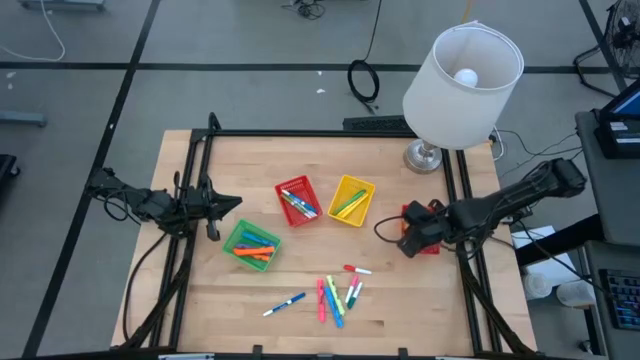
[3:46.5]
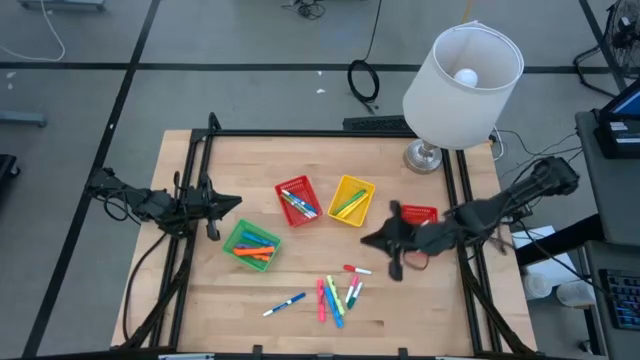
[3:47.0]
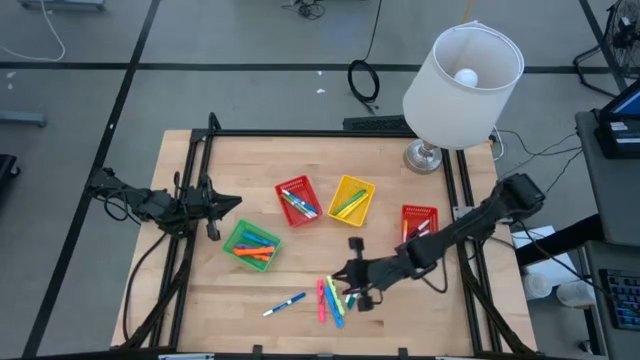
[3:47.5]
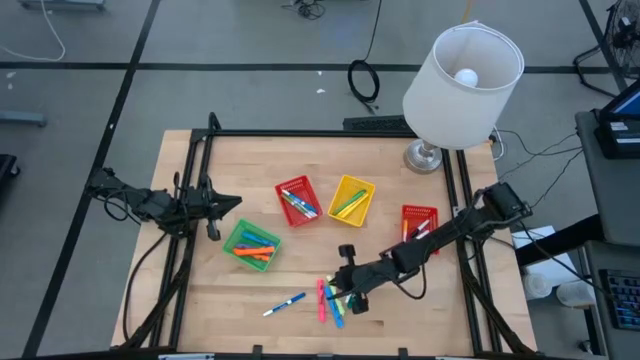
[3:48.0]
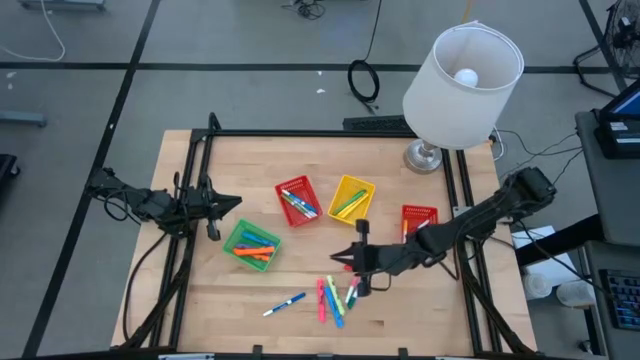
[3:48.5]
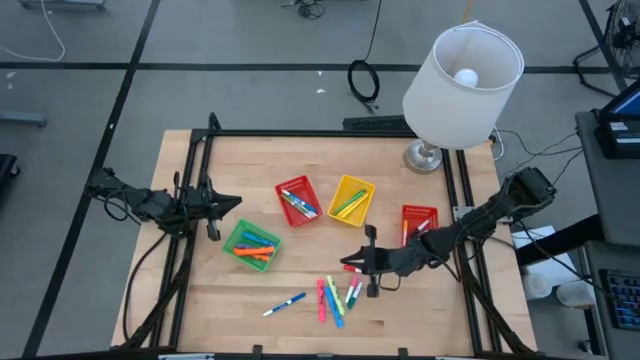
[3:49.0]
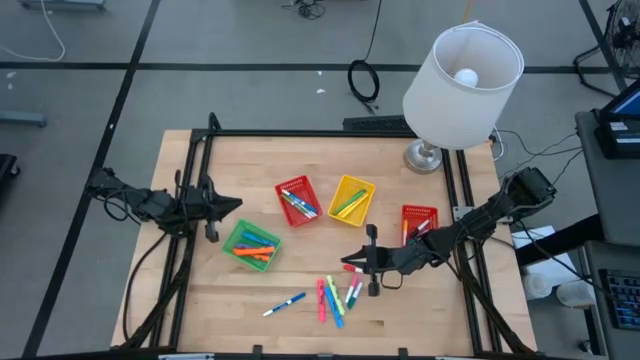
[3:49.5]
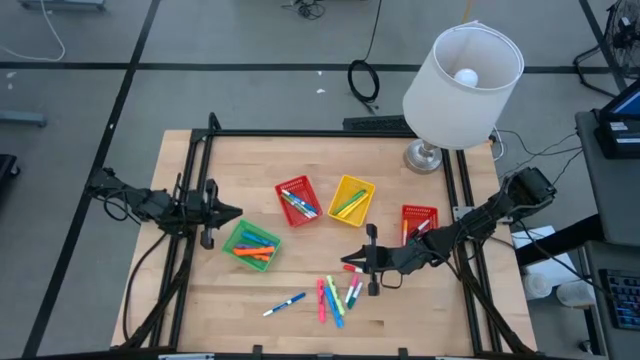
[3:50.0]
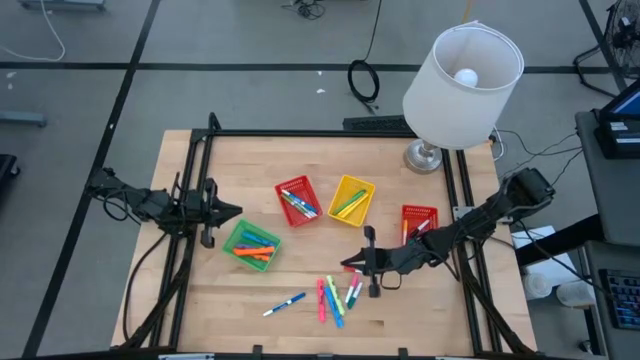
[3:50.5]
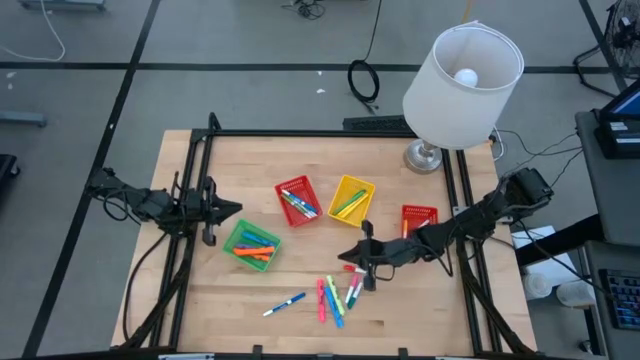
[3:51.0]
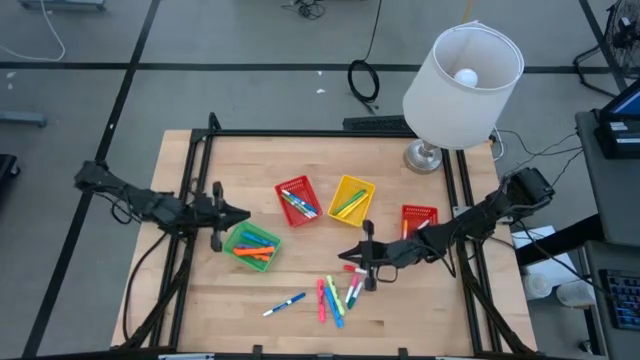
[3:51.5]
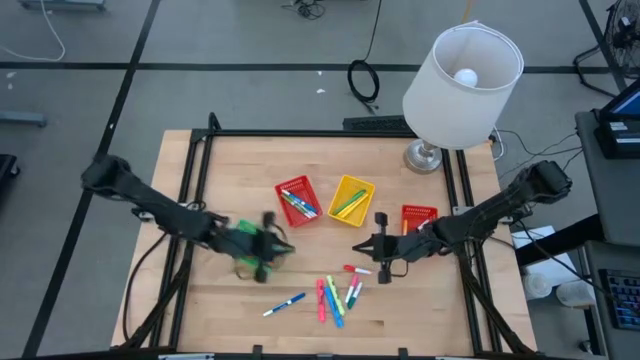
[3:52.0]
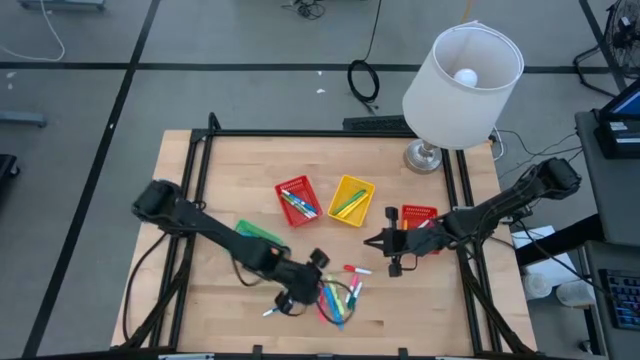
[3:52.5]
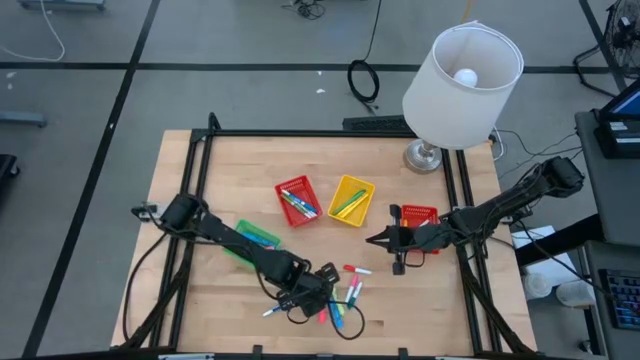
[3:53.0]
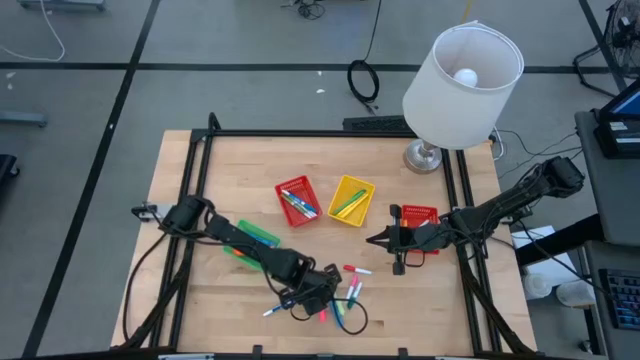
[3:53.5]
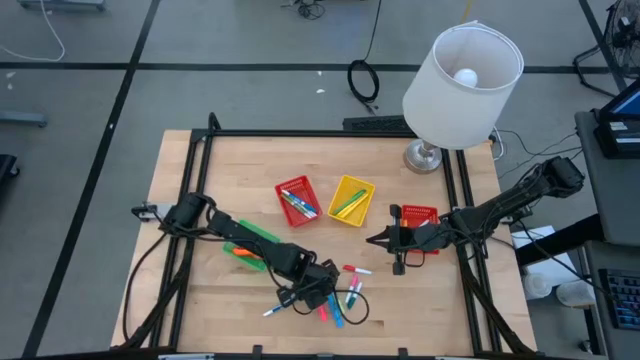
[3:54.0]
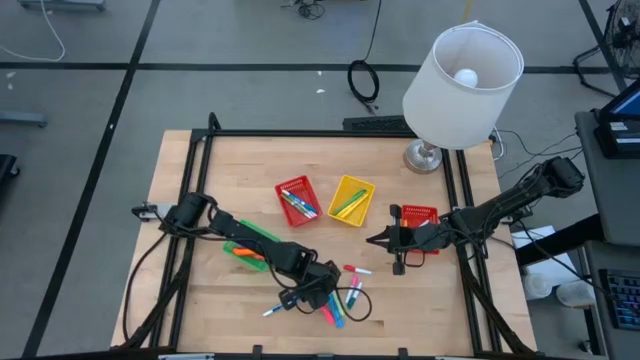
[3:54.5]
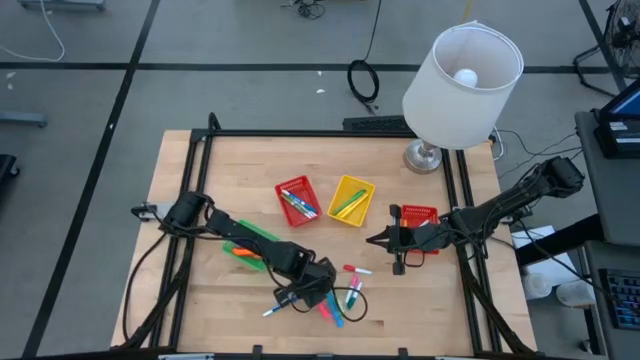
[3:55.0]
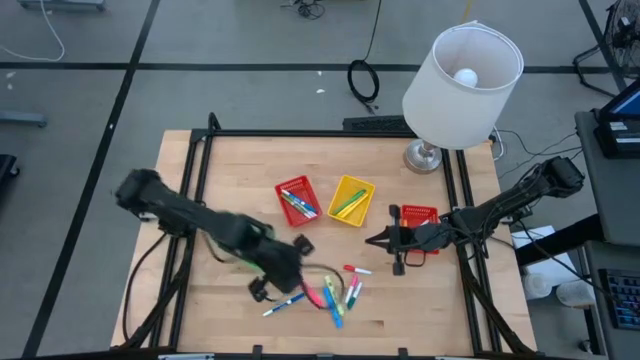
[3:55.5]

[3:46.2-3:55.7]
Task: Pick & Place Markers
Put the pink highlighter into the green bin

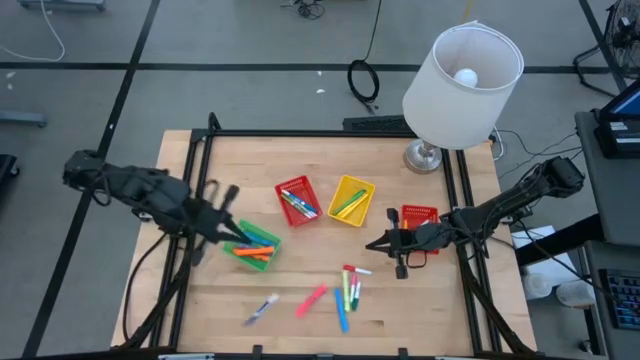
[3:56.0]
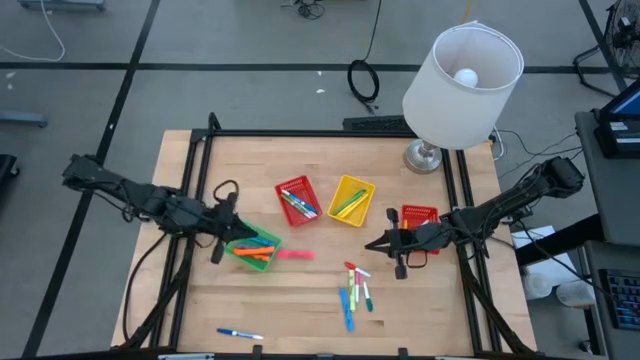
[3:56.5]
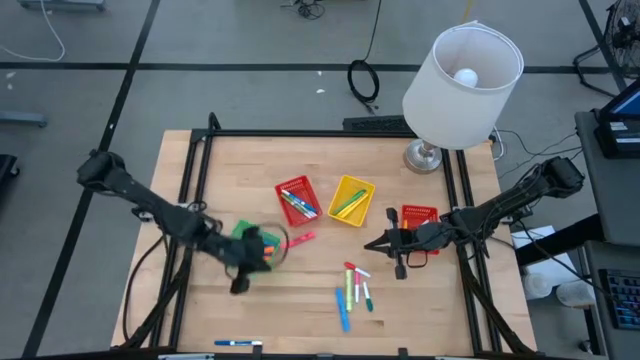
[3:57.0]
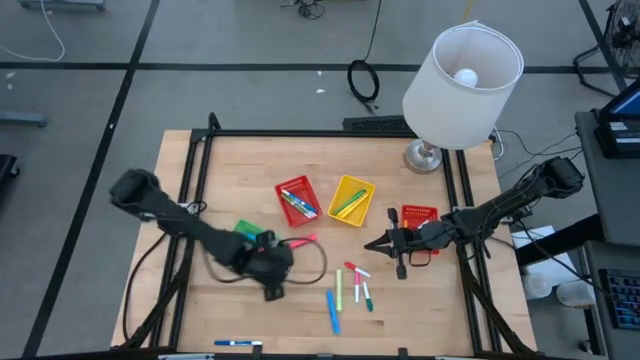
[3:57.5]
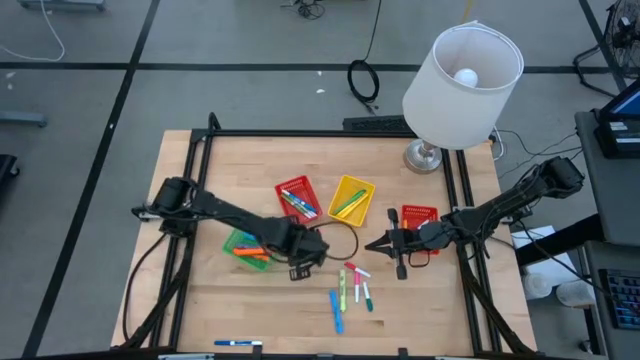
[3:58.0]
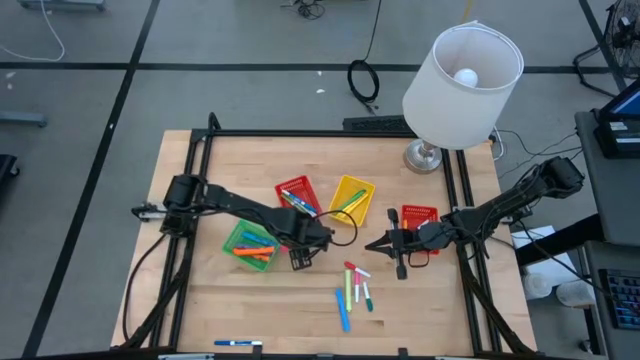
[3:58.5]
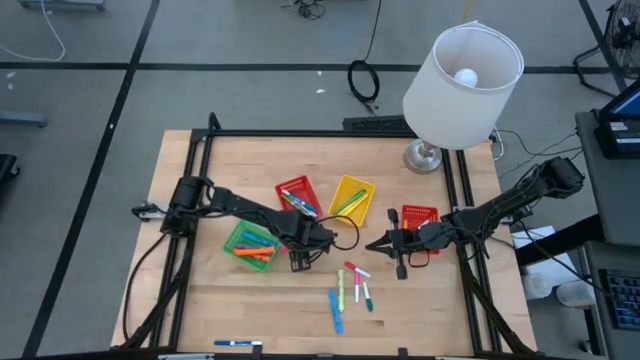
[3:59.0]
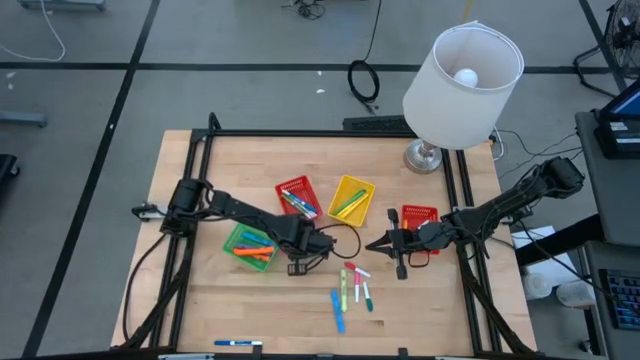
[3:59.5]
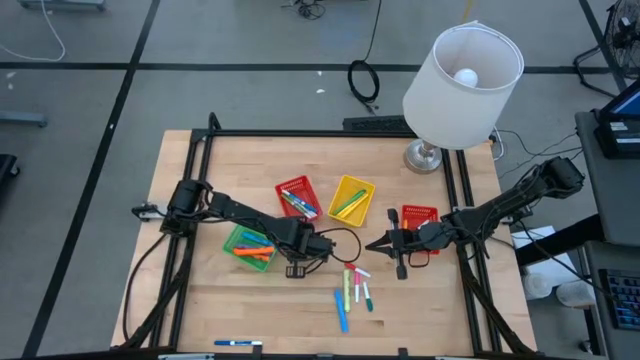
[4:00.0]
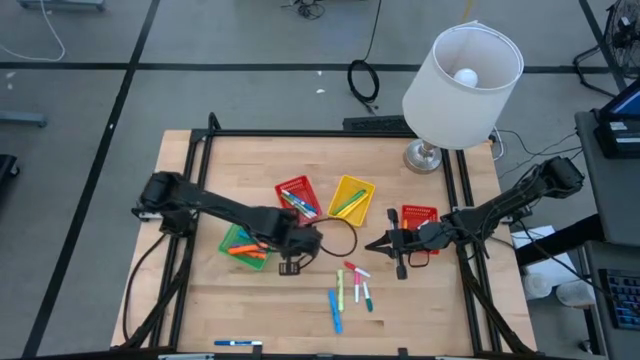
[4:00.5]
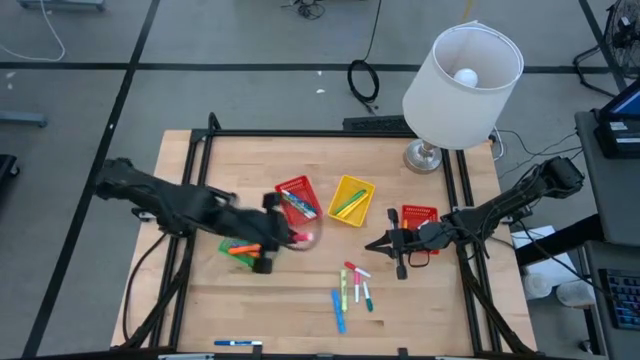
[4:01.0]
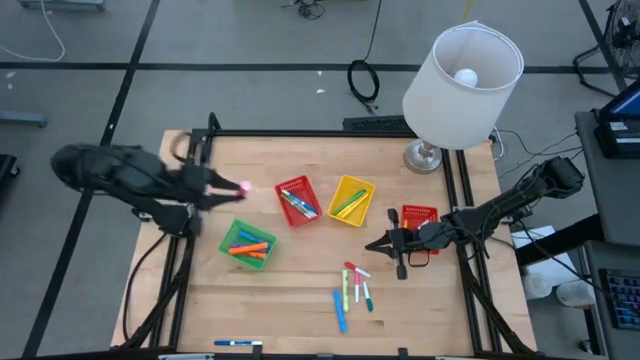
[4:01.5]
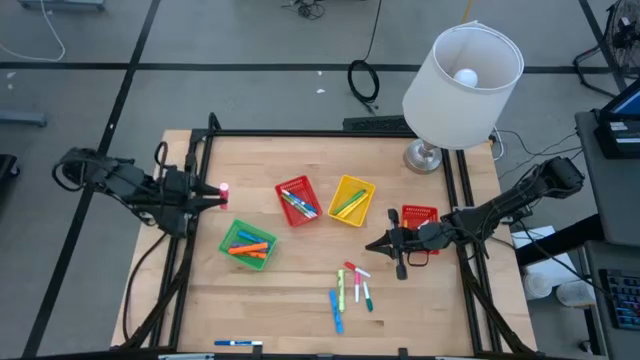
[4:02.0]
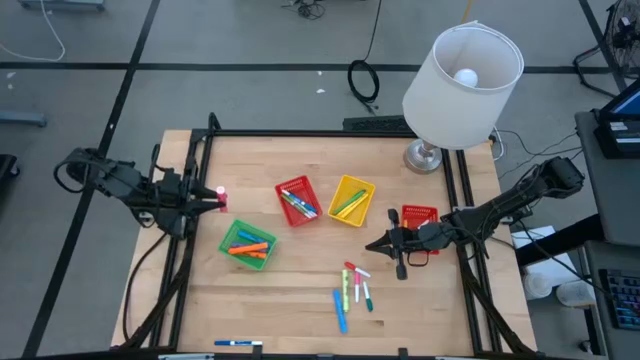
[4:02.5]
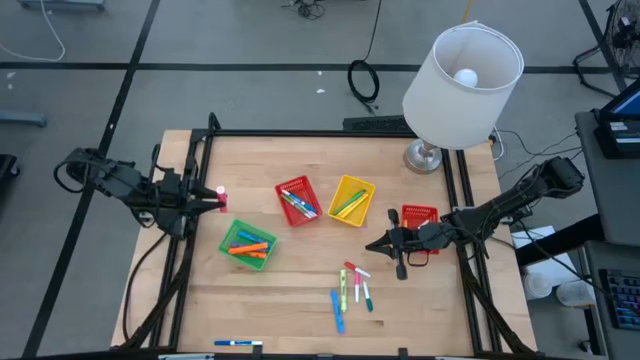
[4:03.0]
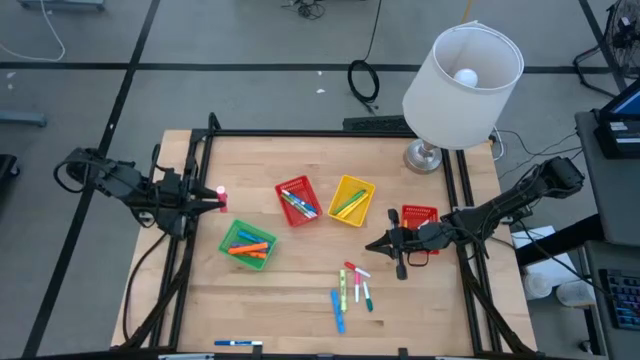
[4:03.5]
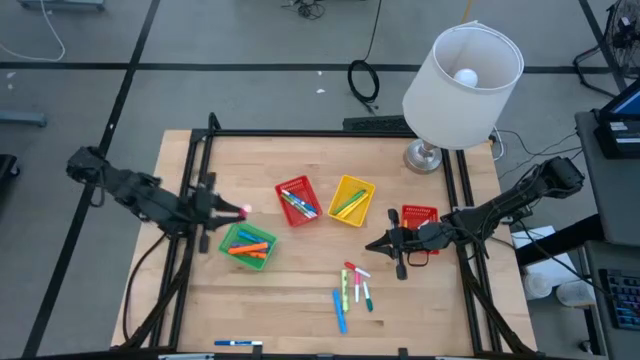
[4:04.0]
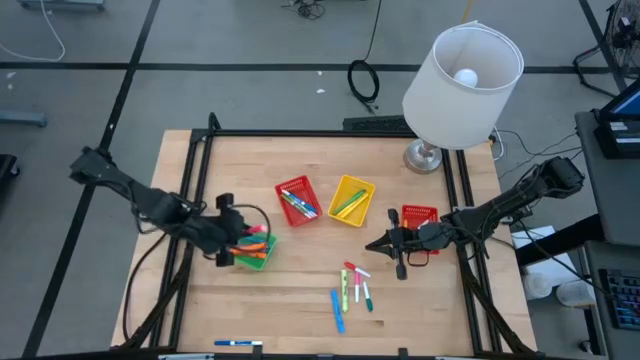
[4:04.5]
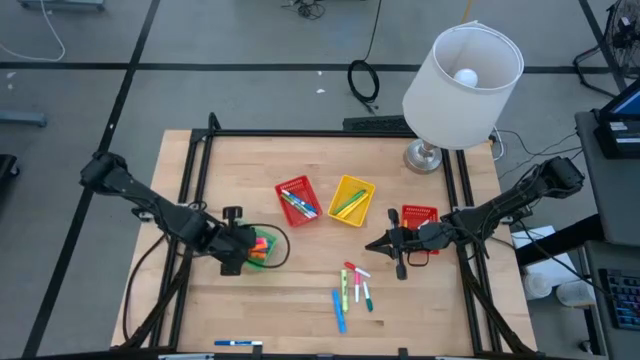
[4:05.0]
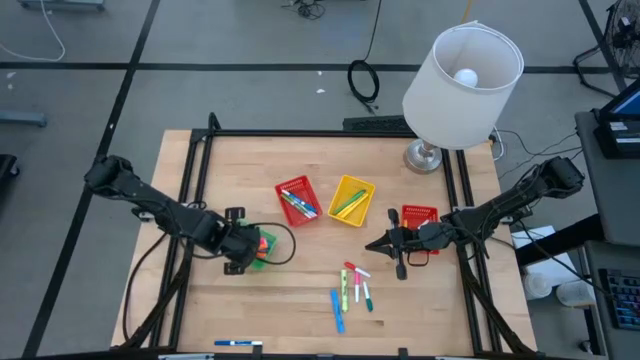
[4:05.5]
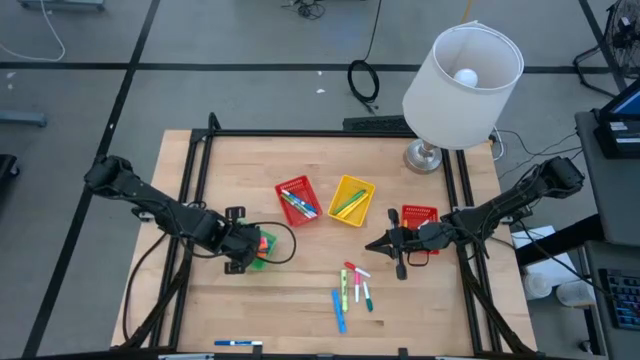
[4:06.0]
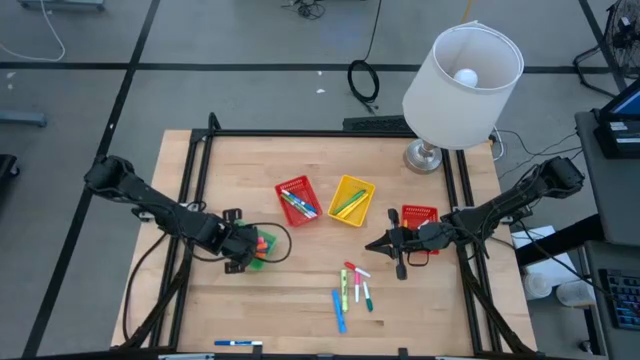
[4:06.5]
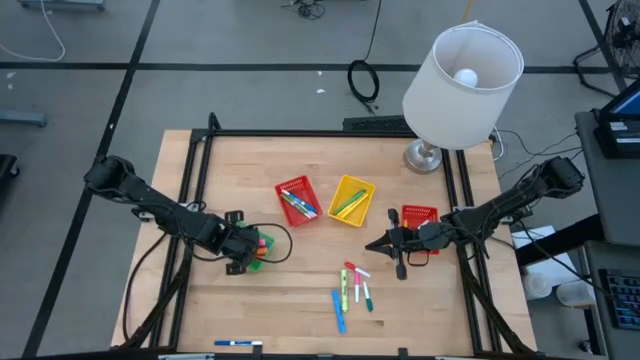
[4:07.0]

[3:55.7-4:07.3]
Put the pink highlighter into the green bin

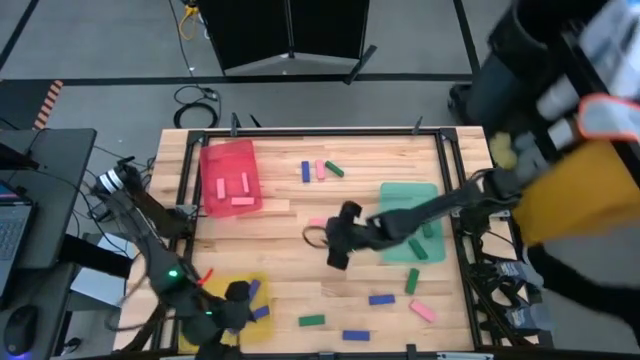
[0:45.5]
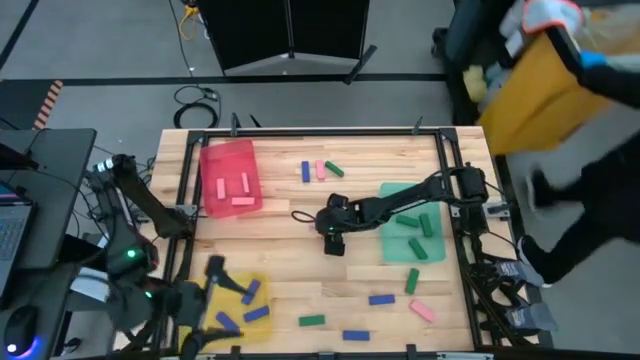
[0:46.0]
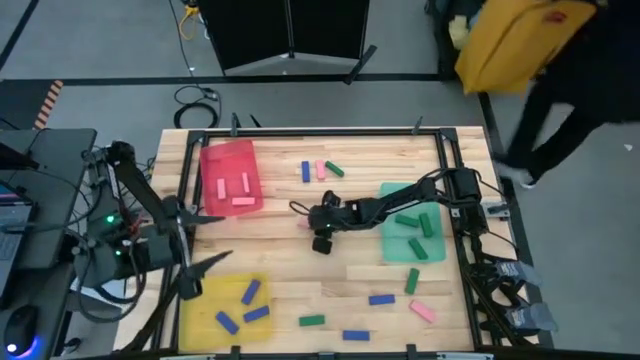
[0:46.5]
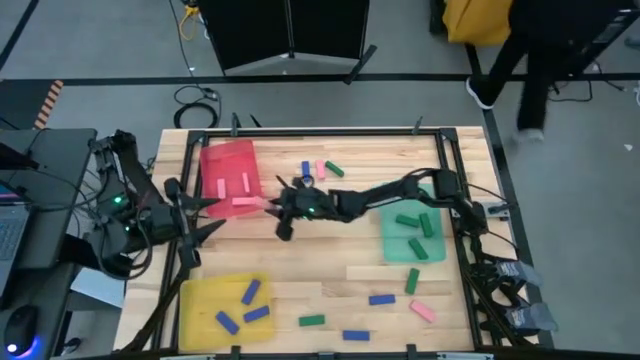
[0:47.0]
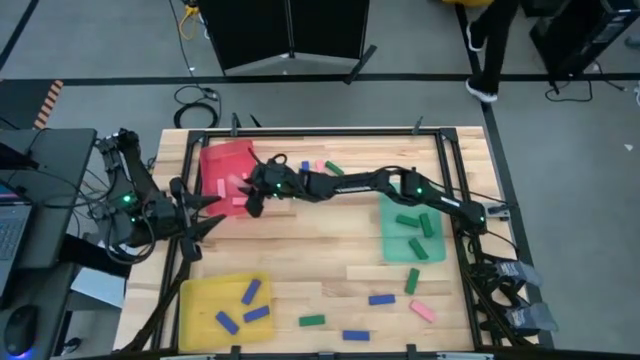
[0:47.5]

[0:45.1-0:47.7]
Task: Sort blocks
Put the pink block into the red bin
